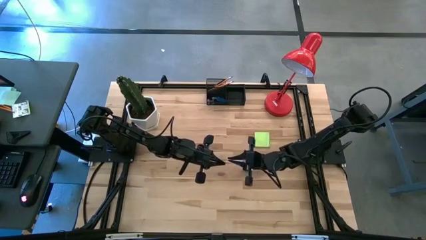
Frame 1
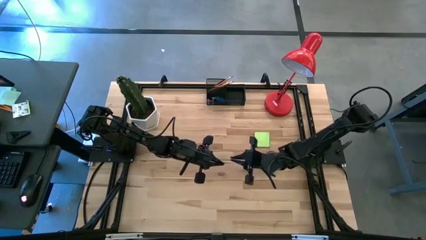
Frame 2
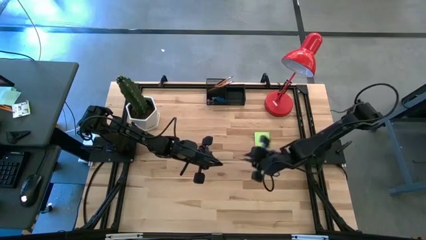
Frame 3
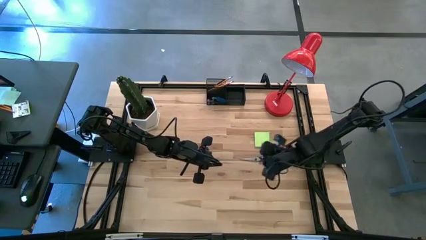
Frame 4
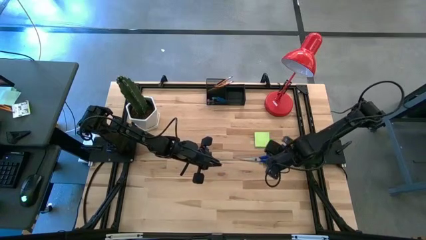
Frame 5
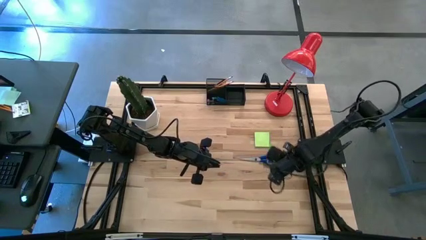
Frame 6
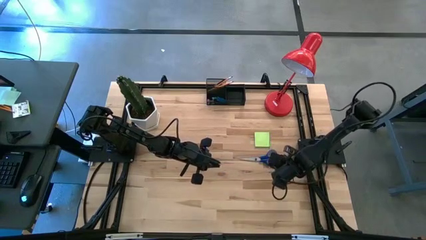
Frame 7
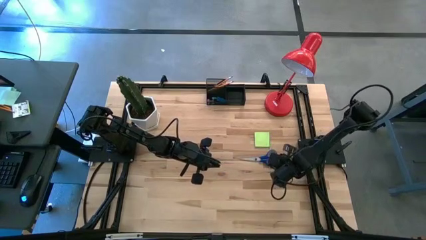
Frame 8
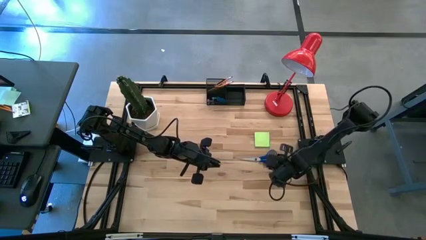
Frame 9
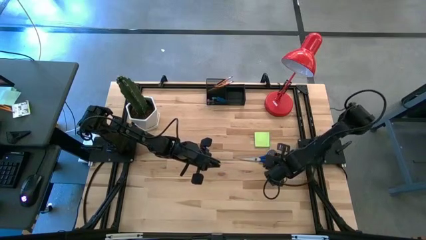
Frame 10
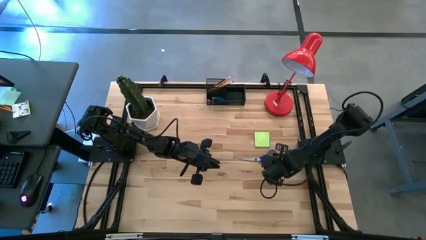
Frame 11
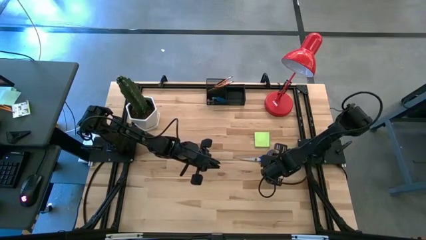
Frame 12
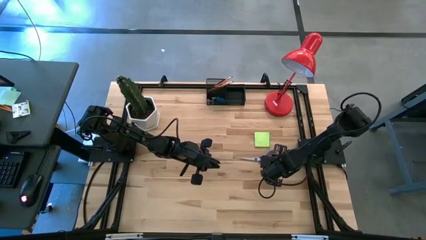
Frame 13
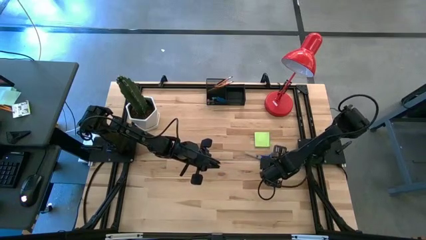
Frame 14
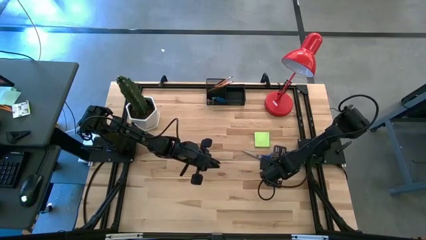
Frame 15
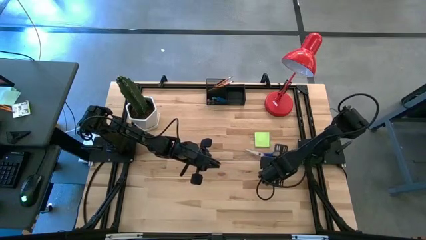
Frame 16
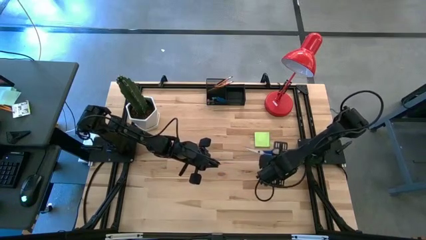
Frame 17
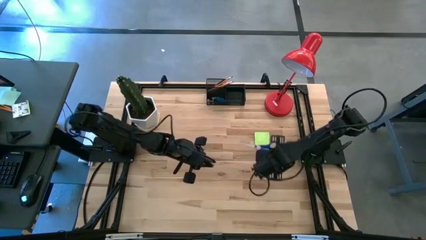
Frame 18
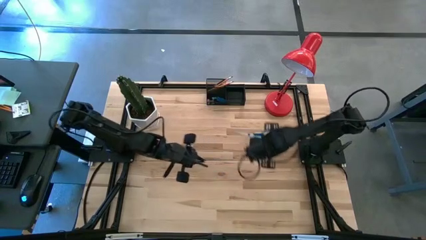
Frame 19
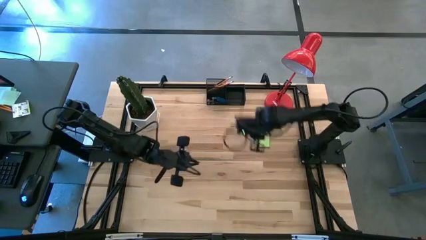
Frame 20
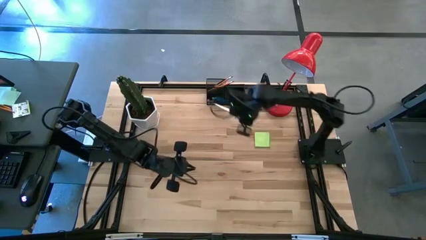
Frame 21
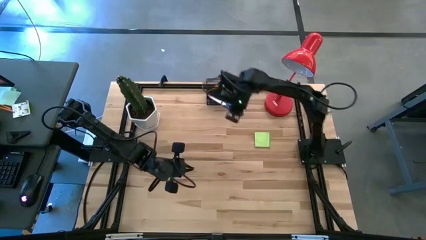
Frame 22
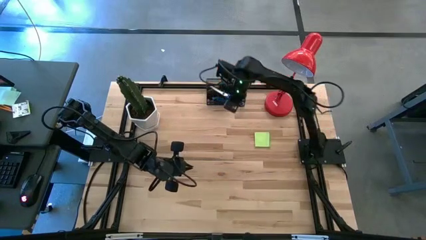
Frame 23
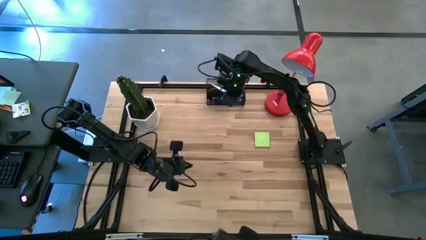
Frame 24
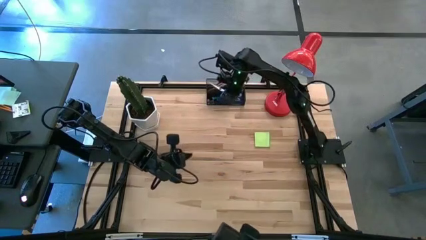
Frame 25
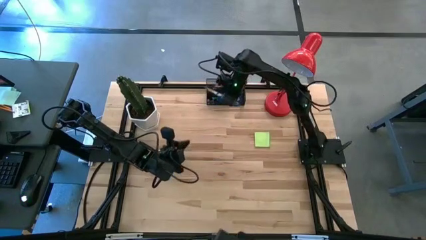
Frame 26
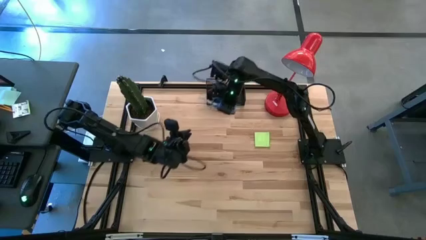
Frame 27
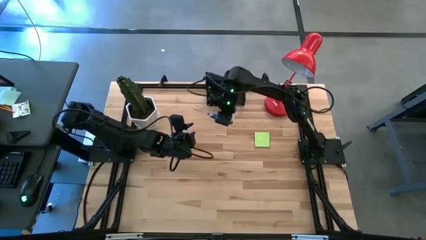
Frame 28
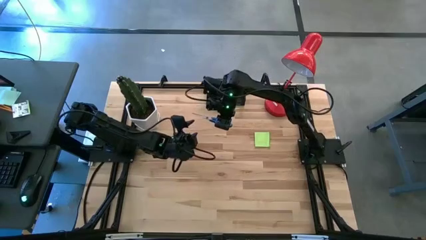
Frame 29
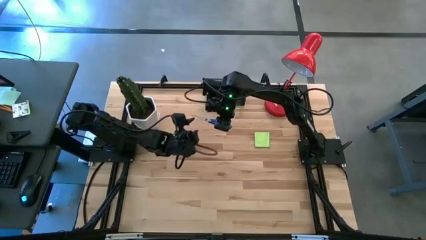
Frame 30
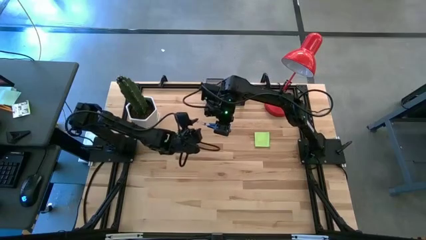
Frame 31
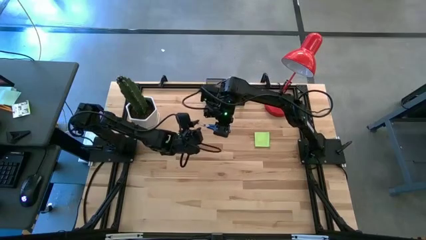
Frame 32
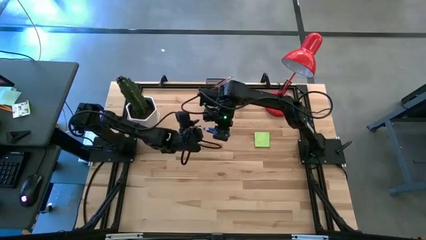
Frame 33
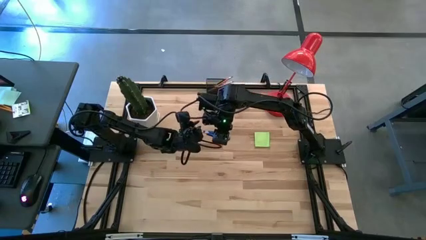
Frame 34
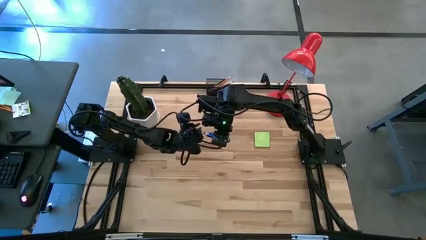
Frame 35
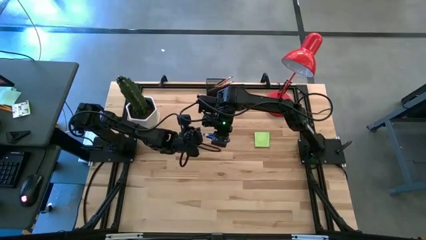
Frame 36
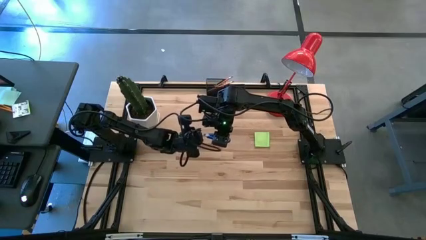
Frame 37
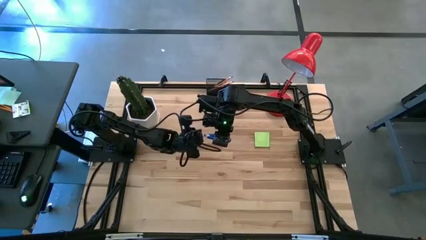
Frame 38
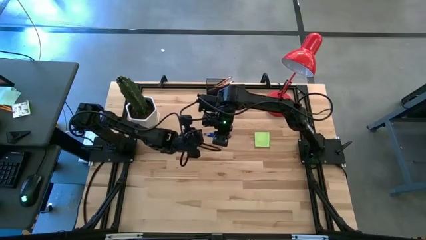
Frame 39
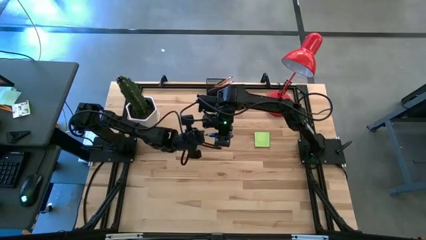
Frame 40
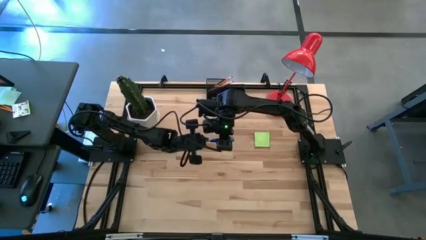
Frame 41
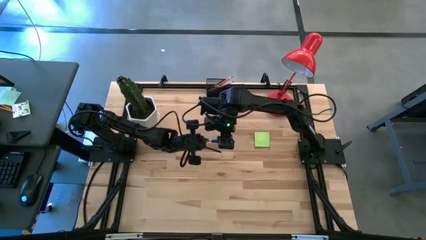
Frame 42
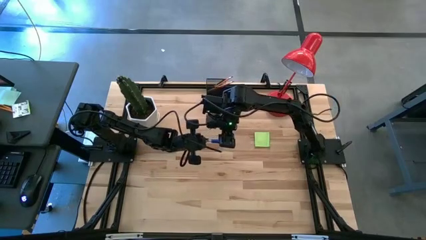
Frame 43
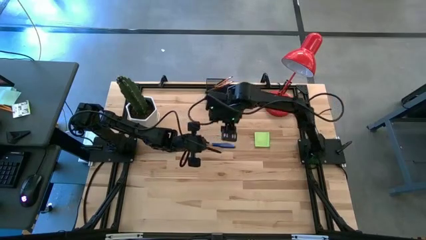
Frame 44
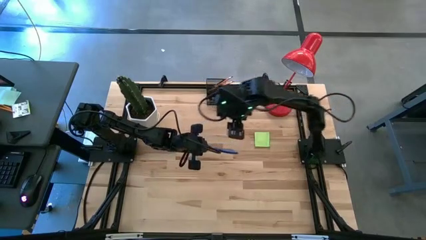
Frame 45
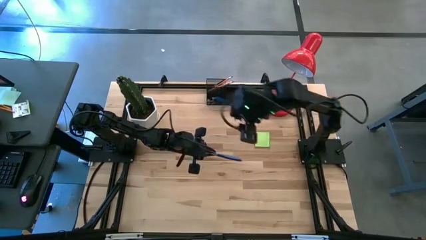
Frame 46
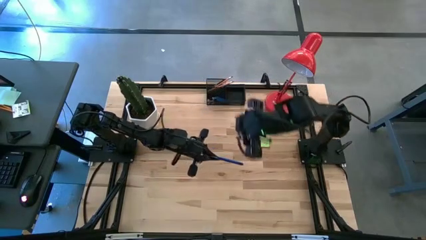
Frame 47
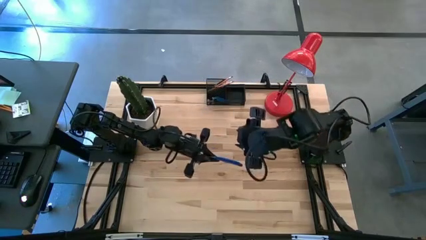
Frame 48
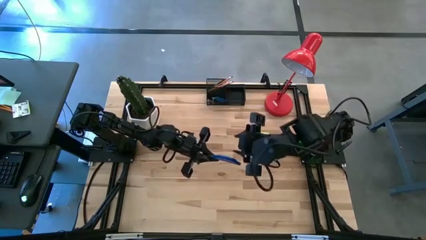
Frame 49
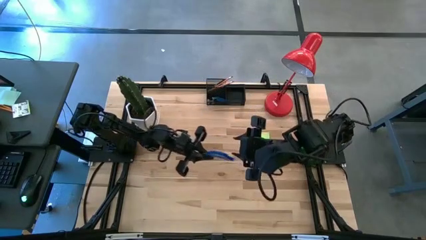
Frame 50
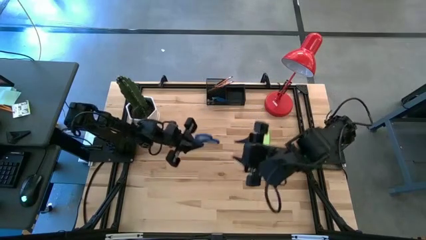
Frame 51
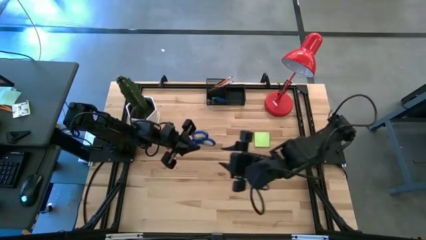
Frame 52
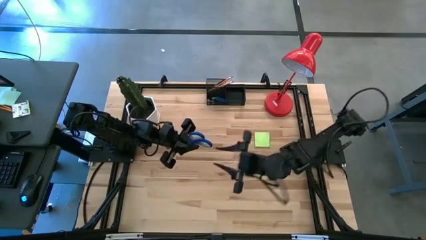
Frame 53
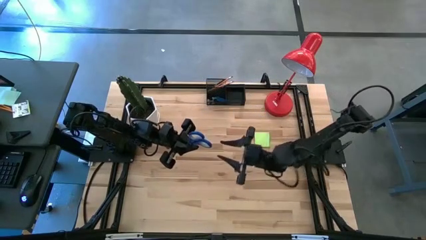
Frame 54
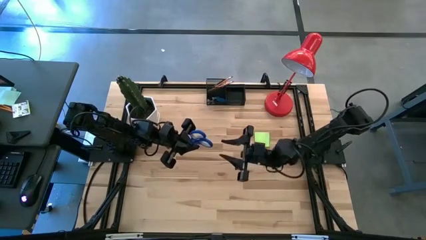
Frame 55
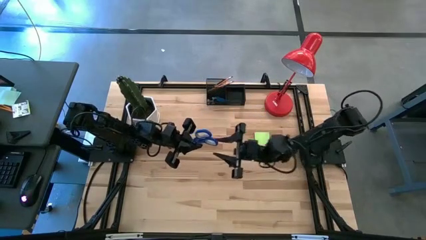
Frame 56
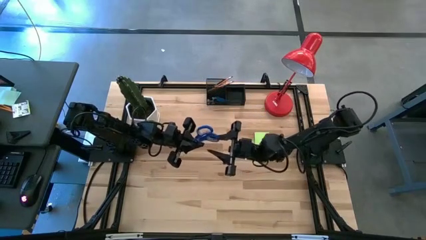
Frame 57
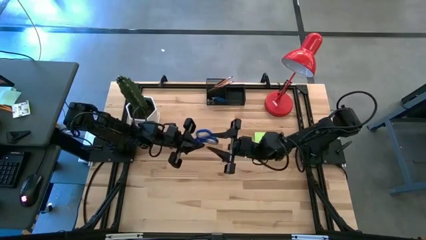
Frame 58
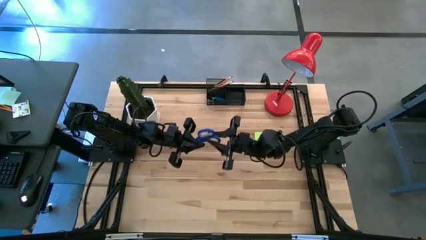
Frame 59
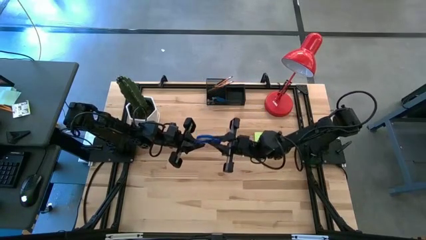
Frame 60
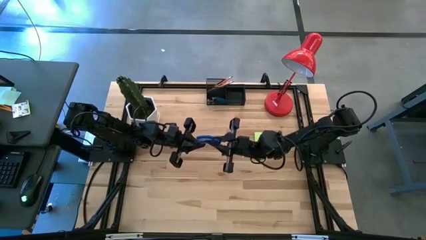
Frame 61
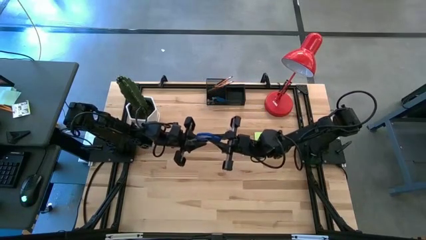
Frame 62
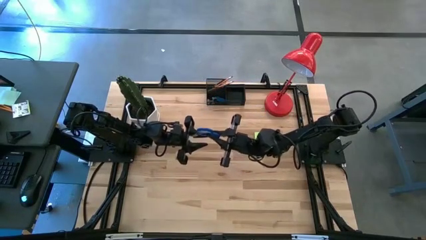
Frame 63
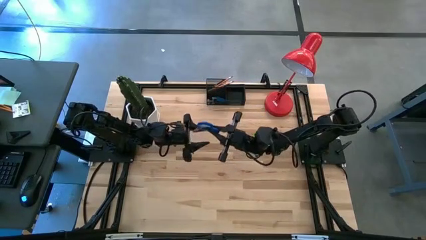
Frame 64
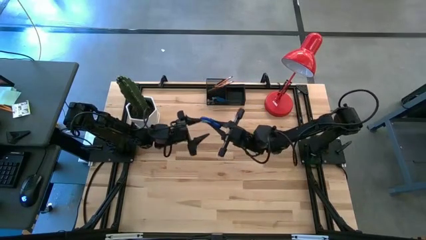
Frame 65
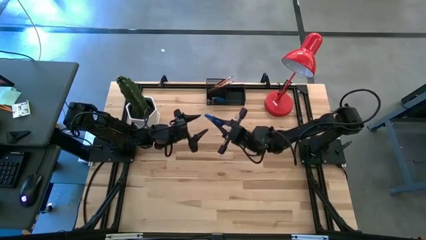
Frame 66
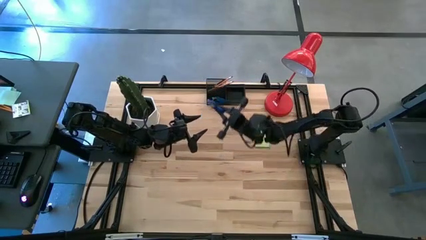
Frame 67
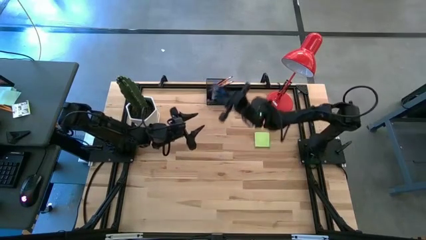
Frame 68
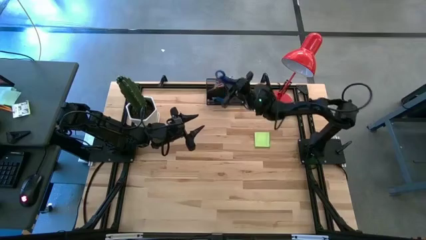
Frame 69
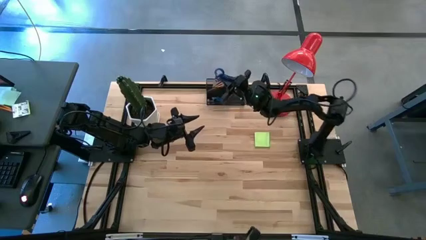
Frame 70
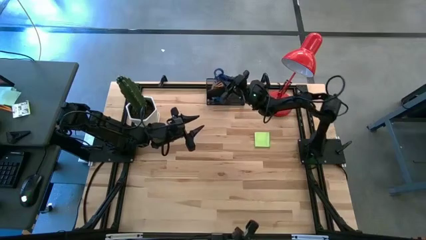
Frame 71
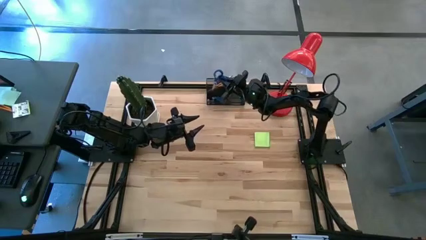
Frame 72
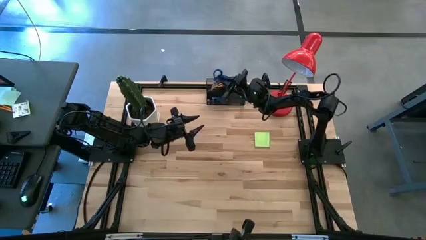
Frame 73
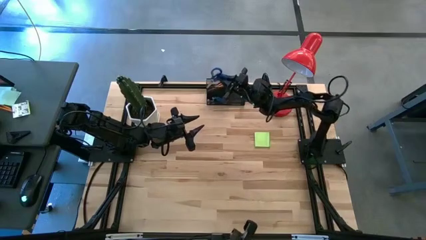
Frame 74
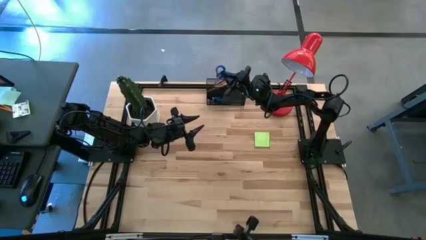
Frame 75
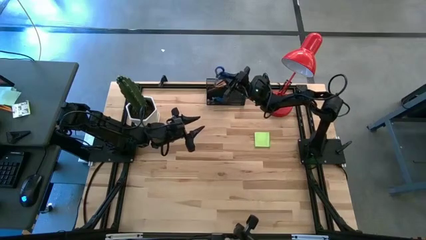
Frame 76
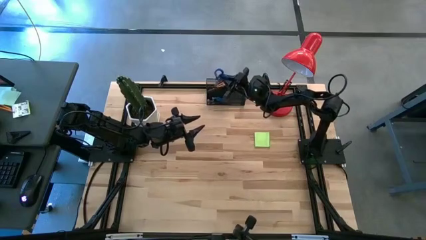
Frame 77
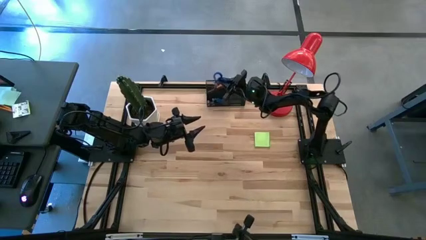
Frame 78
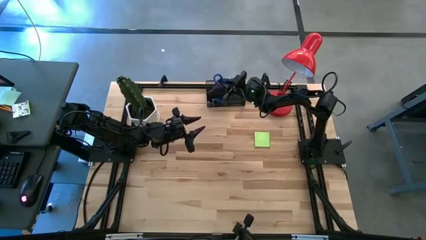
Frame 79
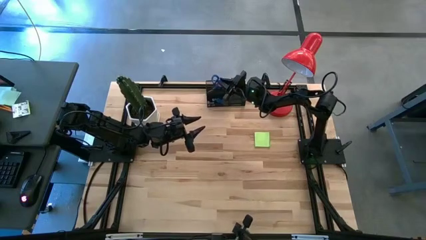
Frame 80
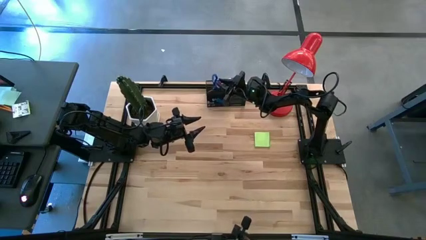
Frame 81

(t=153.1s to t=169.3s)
Task: Pick and place office supplies into organizer
Put the blue scissors into the top left section of the desk organizer
